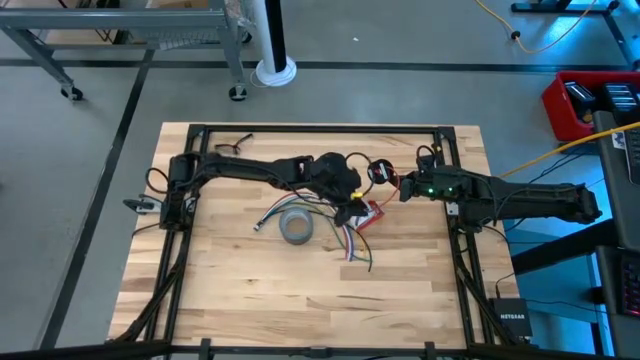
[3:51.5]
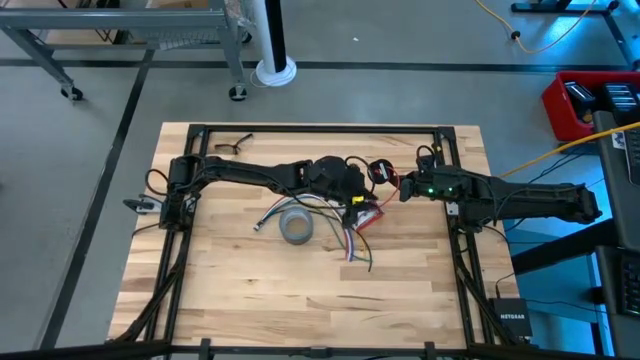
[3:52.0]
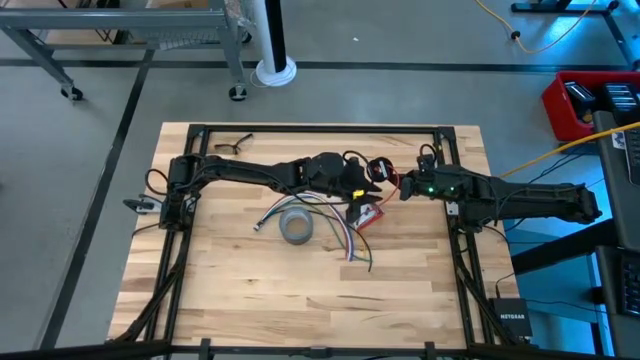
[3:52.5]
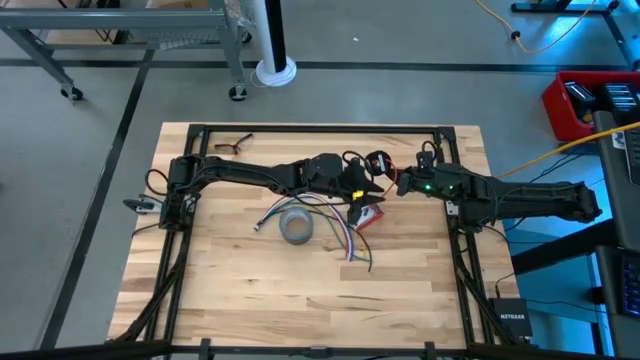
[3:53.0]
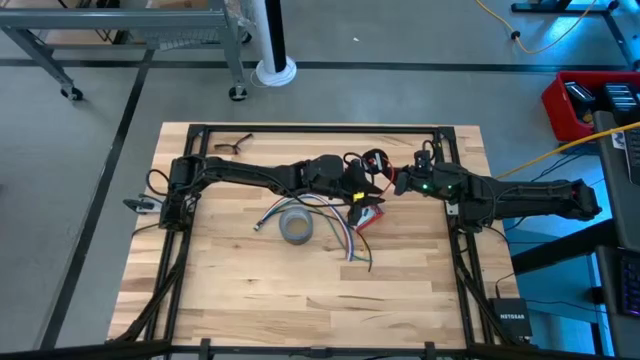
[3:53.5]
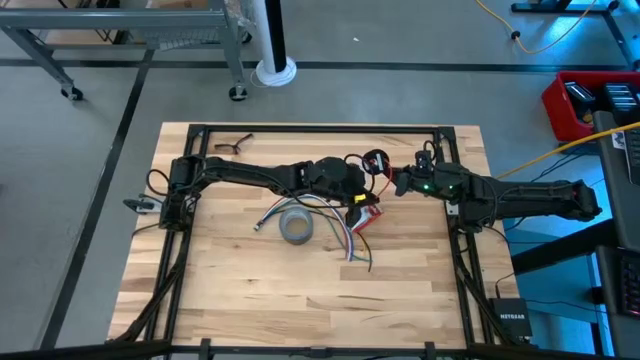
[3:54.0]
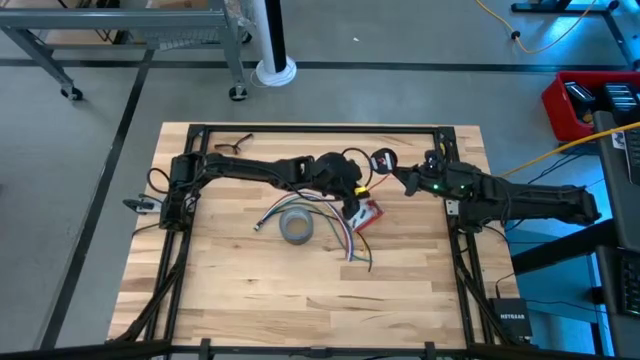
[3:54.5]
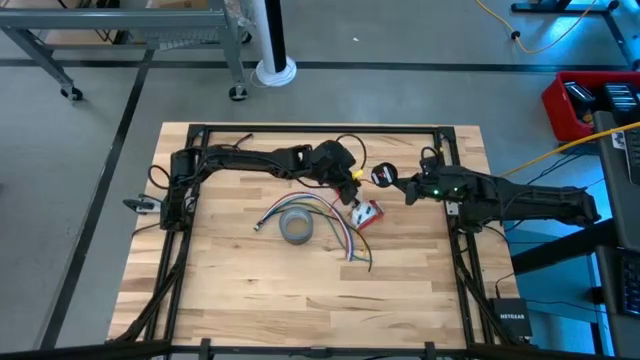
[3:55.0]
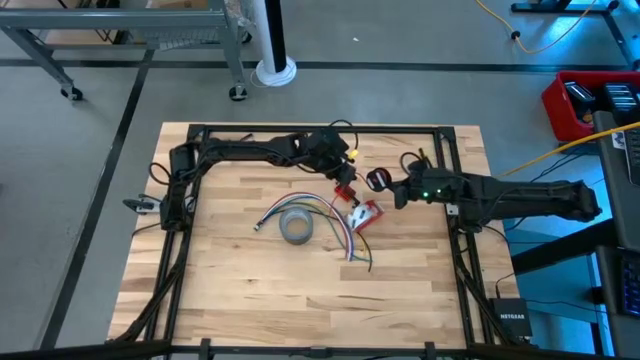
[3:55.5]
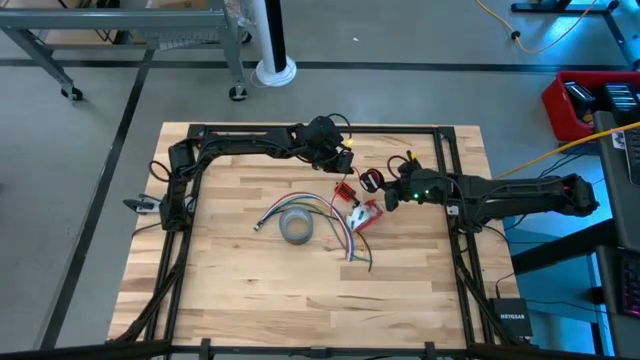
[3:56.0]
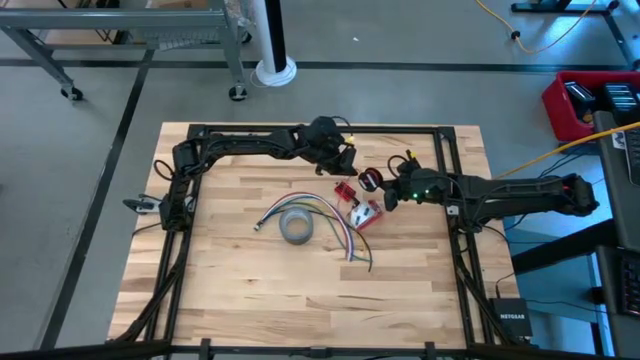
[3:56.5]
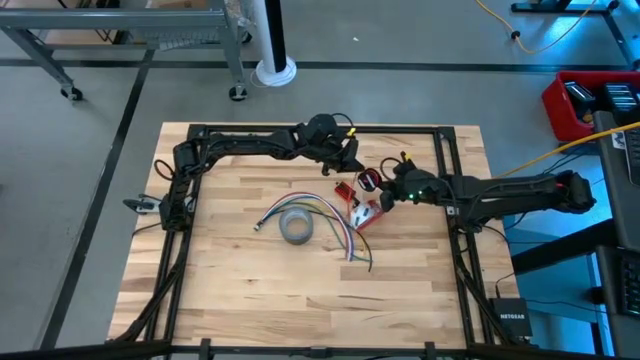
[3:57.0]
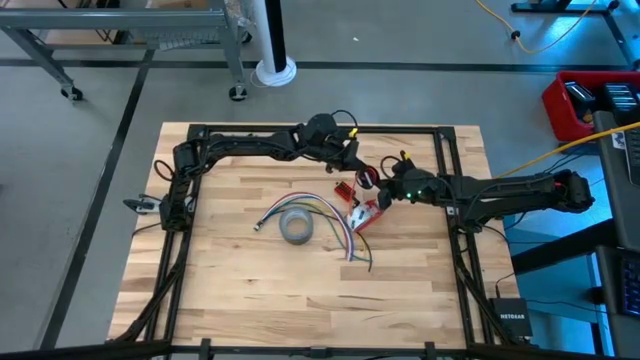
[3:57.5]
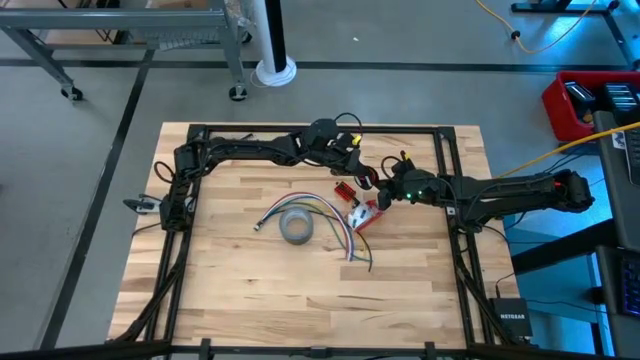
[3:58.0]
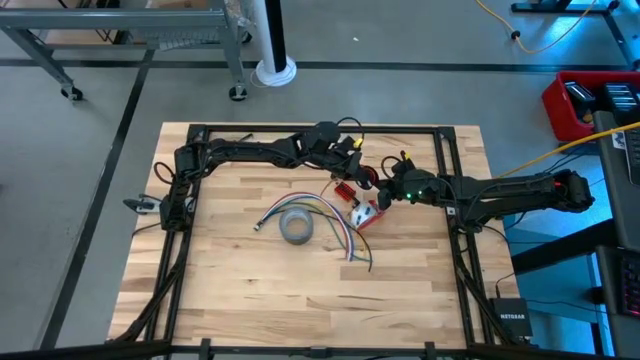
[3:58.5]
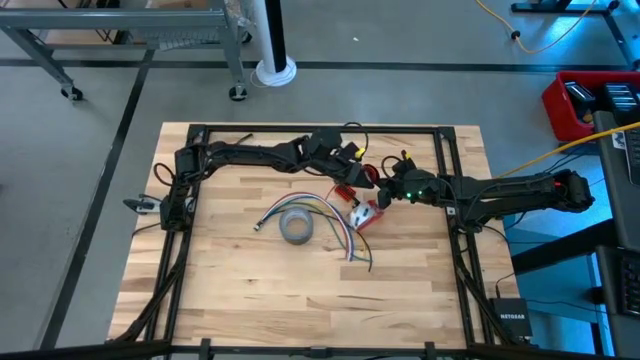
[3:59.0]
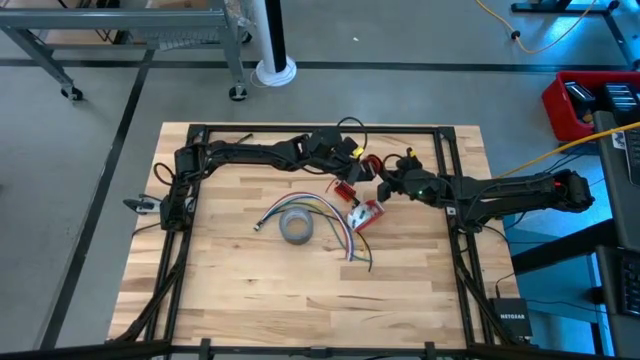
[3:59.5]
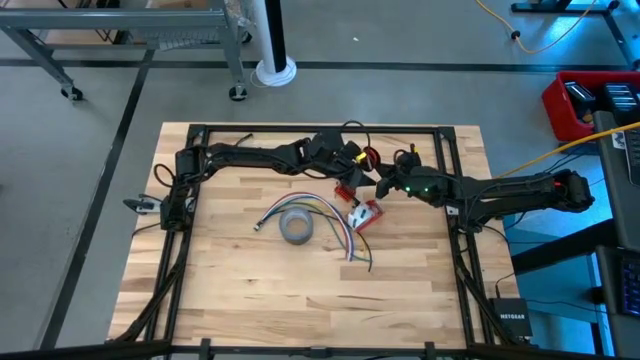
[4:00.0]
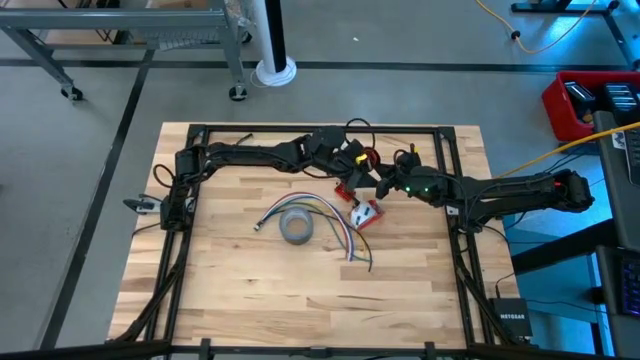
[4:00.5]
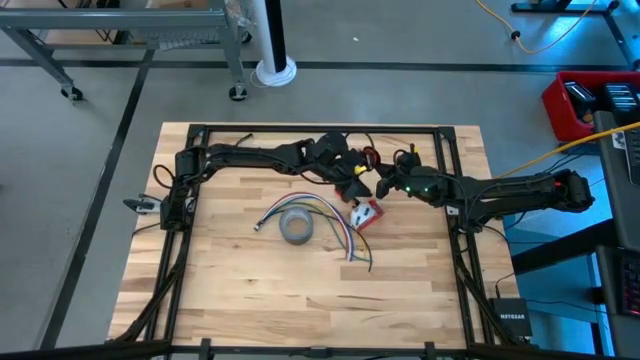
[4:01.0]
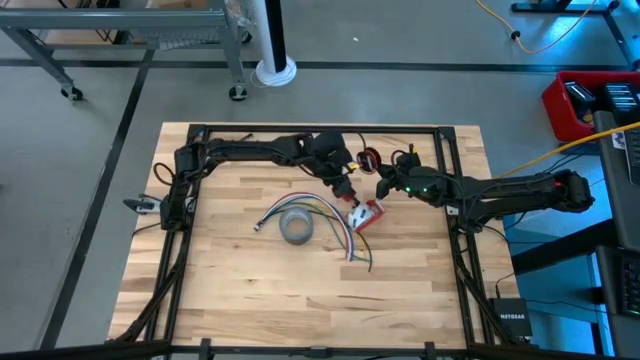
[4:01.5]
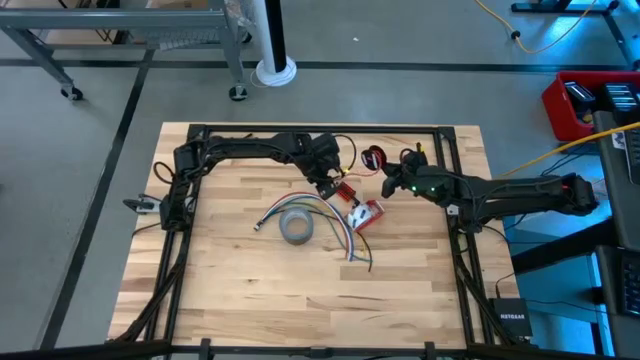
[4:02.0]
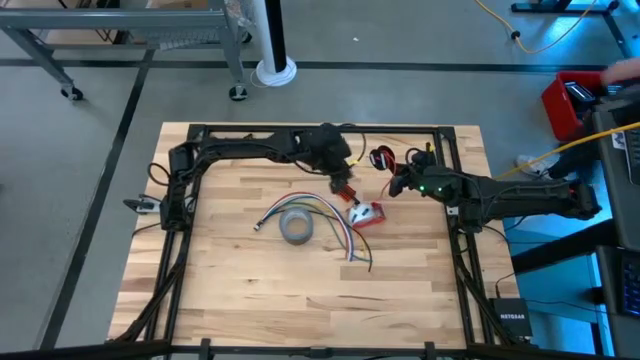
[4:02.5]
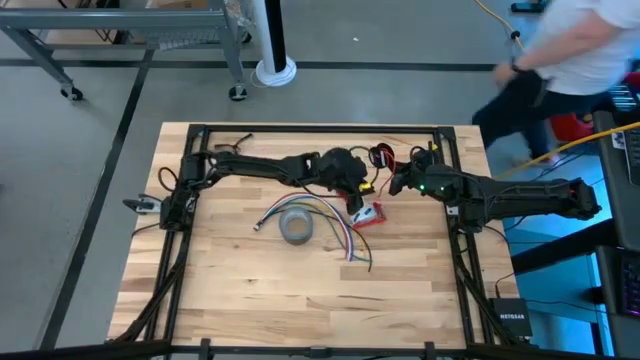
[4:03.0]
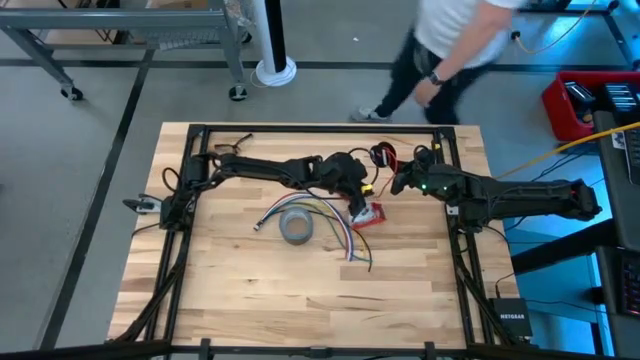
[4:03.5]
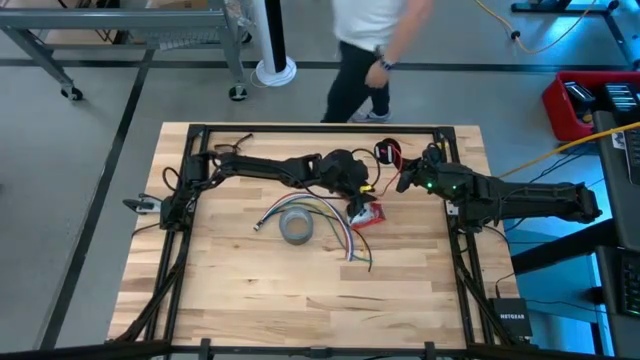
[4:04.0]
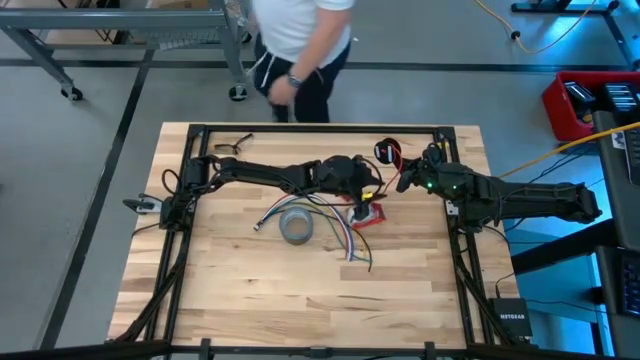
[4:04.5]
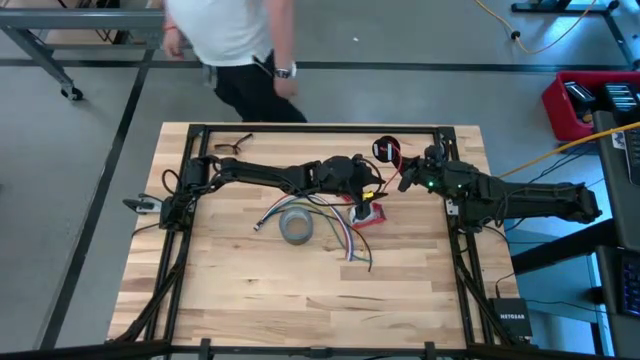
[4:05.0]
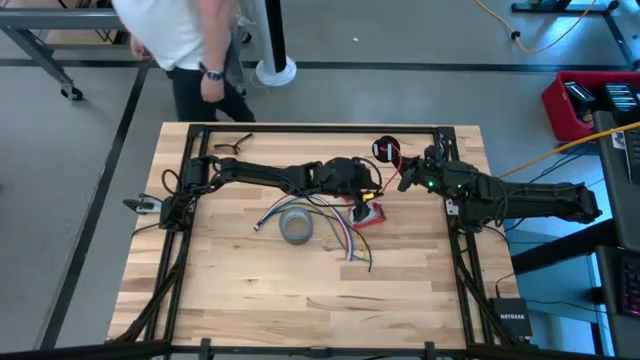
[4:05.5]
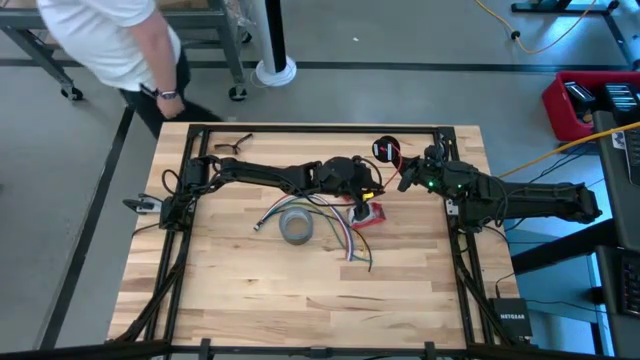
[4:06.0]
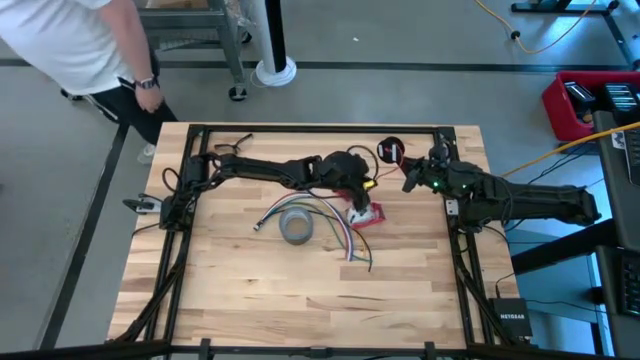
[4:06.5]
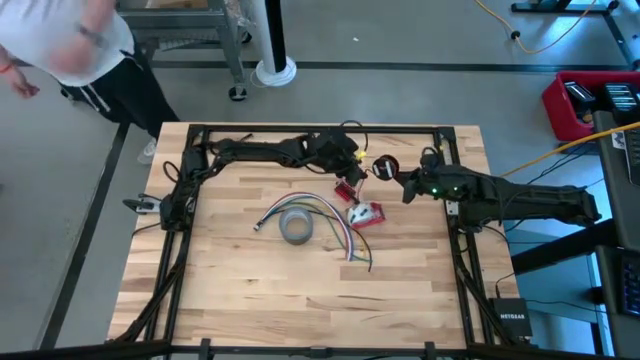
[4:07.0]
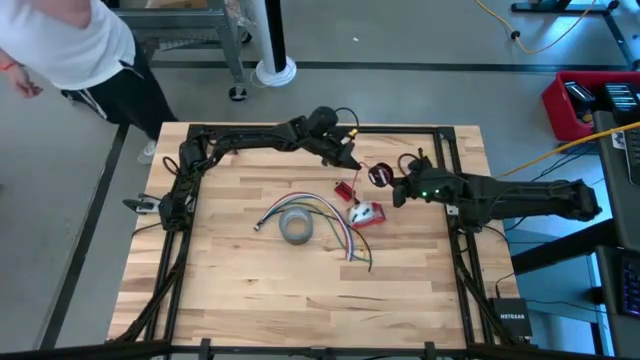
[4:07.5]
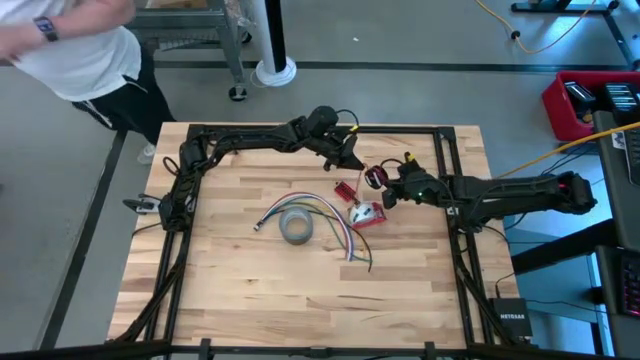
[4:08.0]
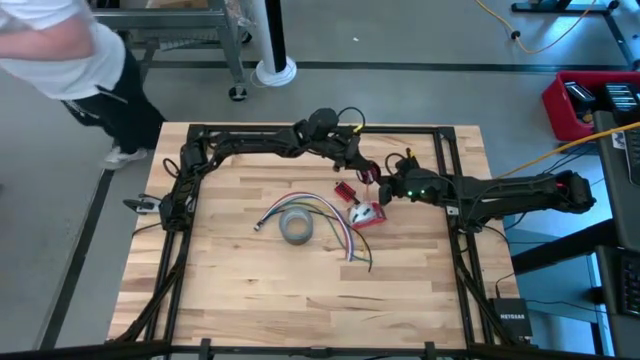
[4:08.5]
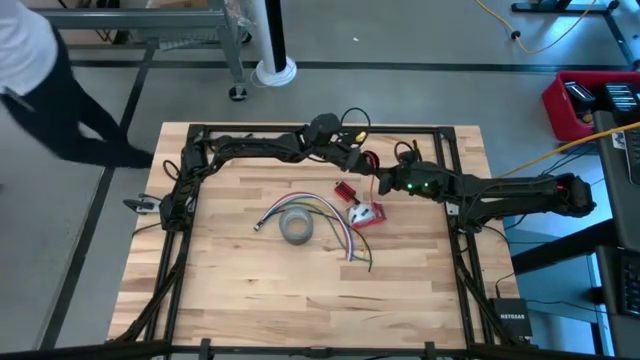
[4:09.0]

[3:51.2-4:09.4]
Task: Coil cords
Coil the red wire on the black spool

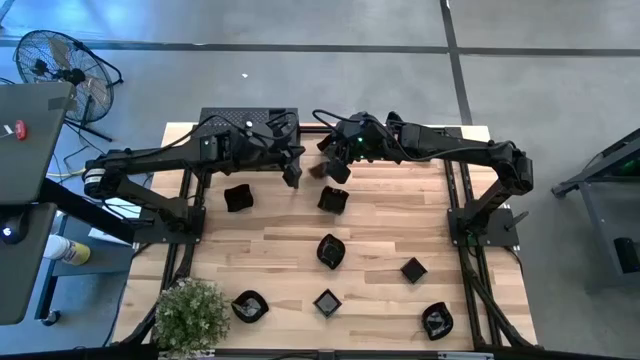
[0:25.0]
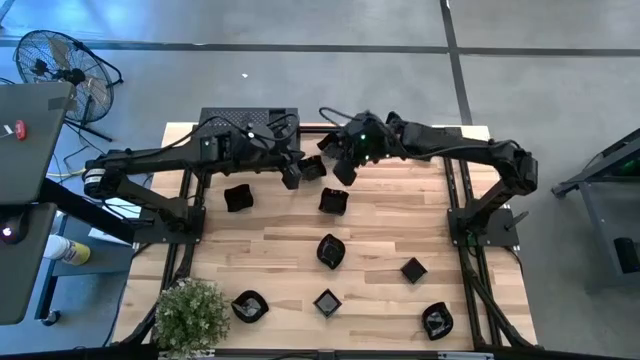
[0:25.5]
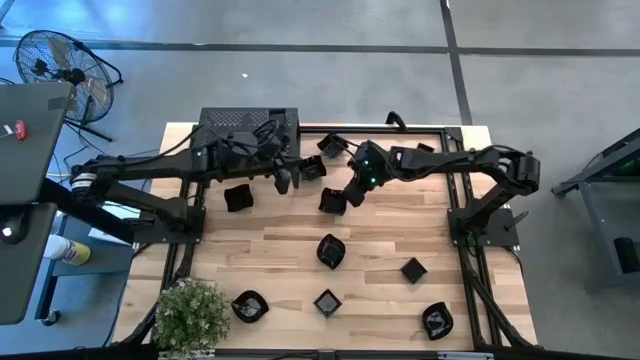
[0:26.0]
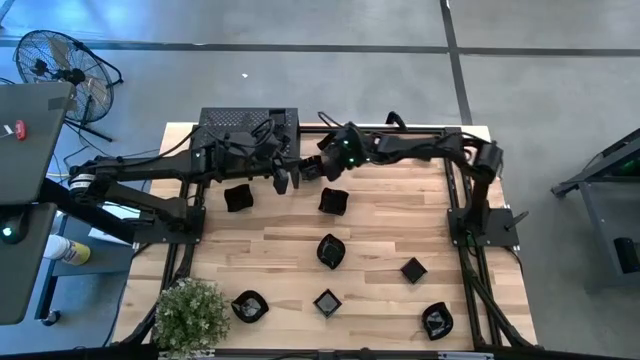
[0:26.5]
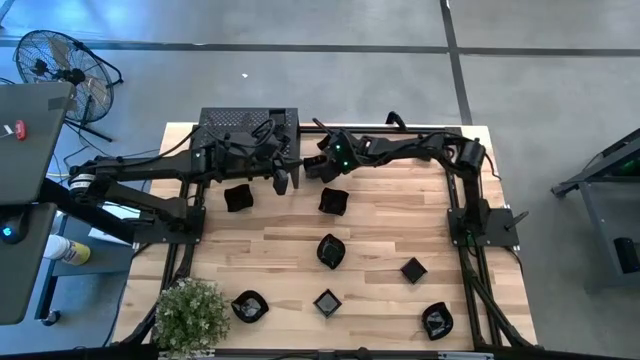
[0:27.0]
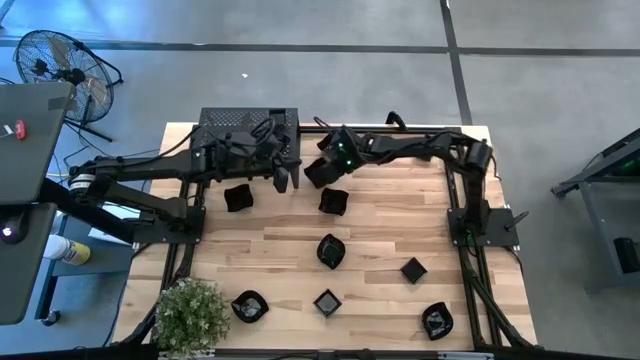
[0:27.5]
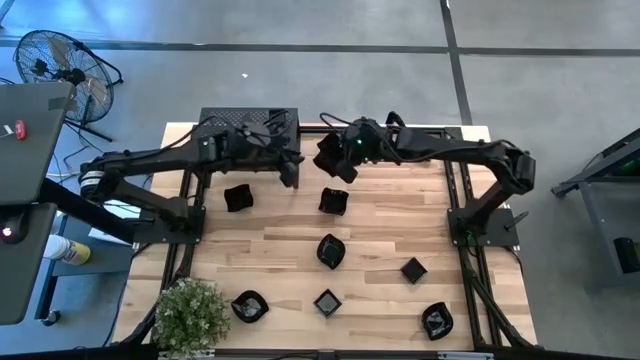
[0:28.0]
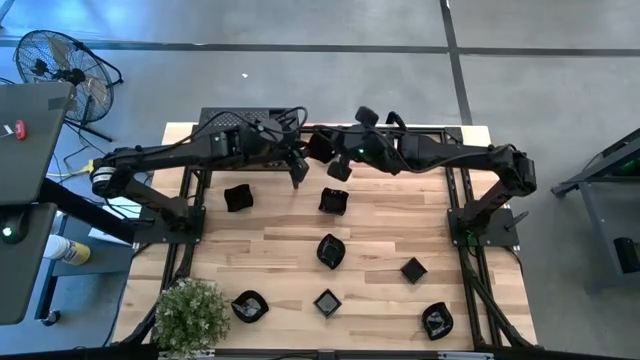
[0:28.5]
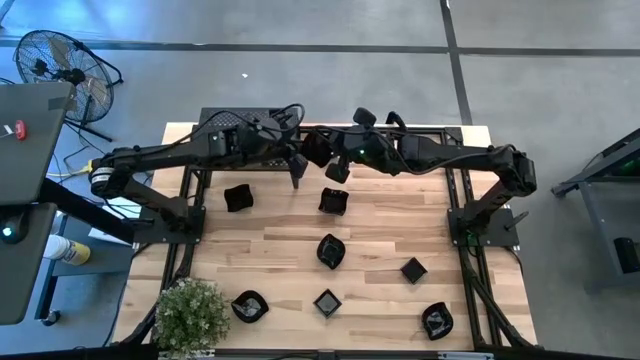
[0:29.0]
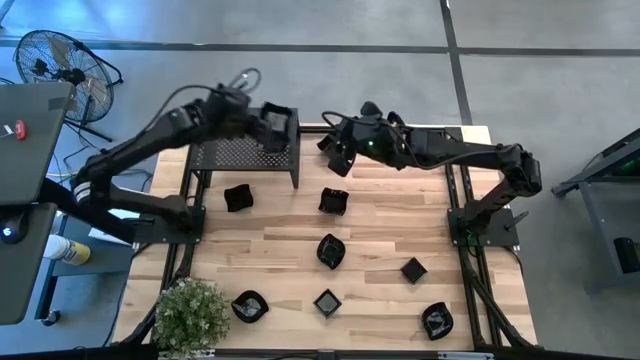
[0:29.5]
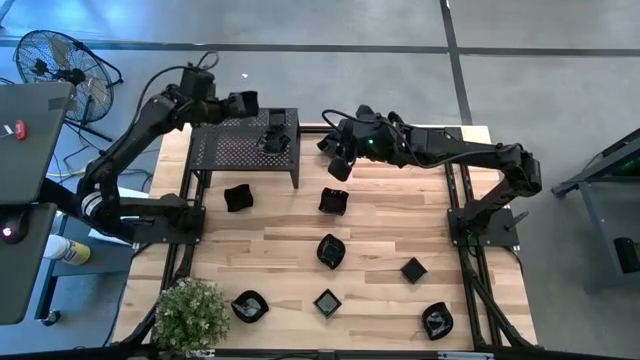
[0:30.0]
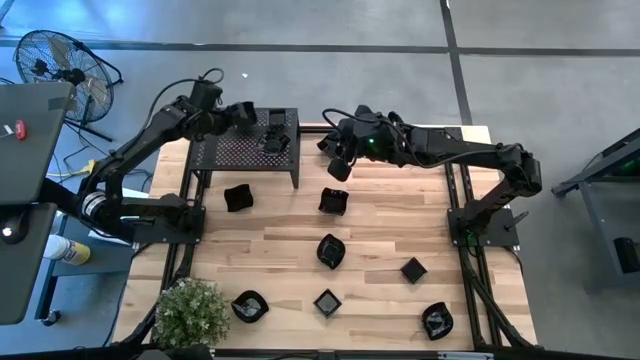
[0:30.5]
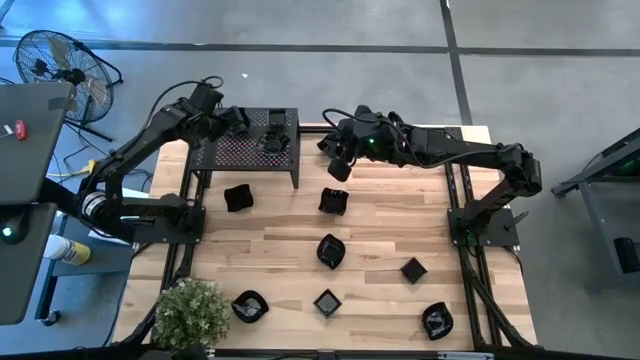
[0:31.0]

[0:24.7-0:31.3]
Task: Pick & Place Mini shaped plates
Put the distorted square plate on the shelf
